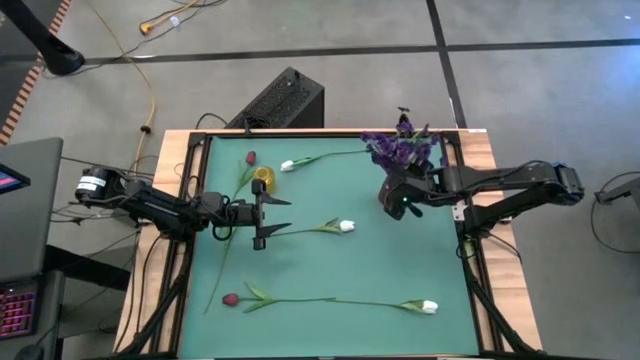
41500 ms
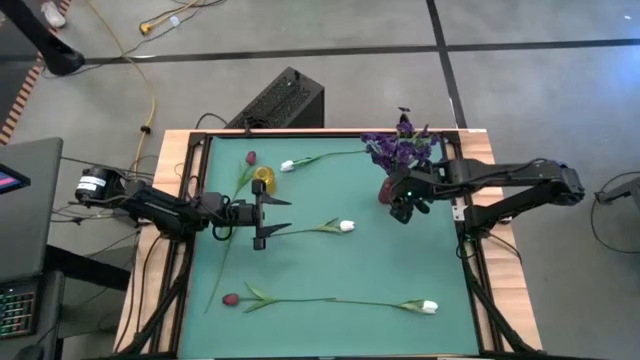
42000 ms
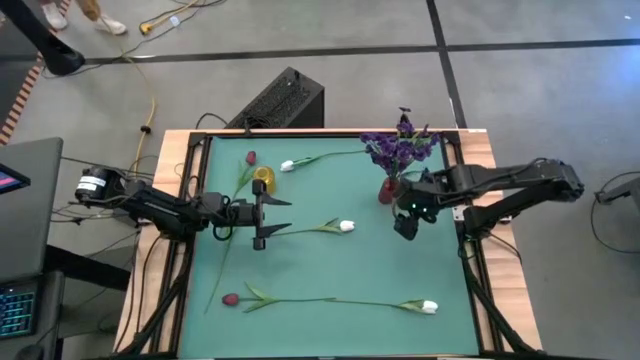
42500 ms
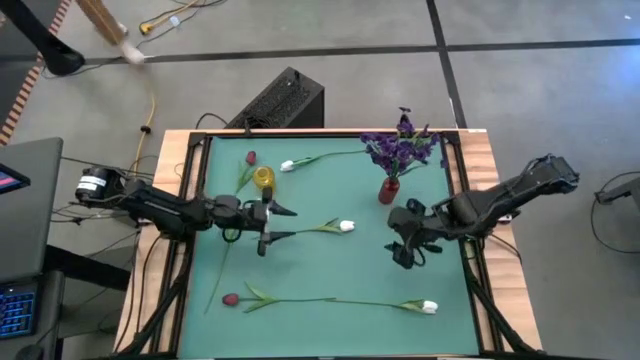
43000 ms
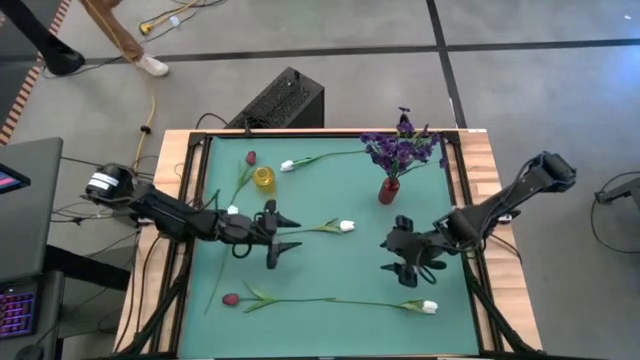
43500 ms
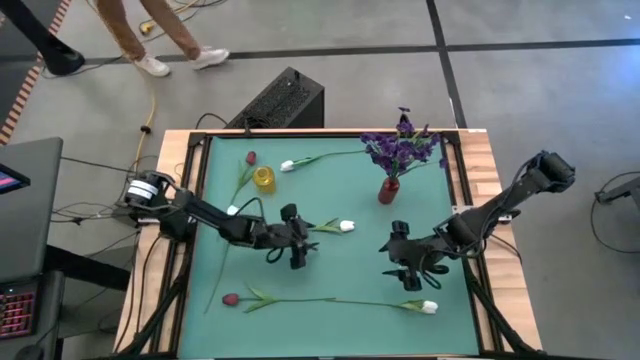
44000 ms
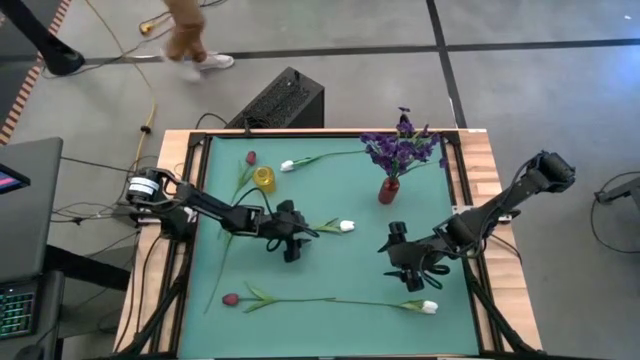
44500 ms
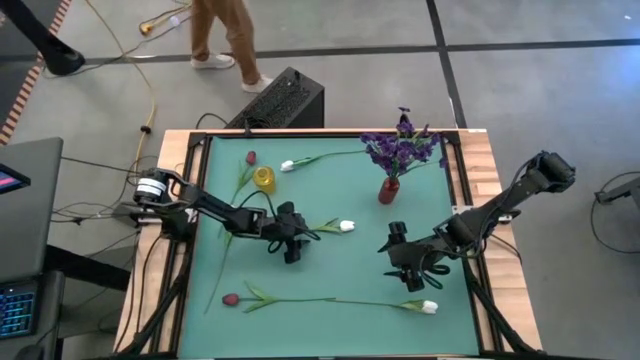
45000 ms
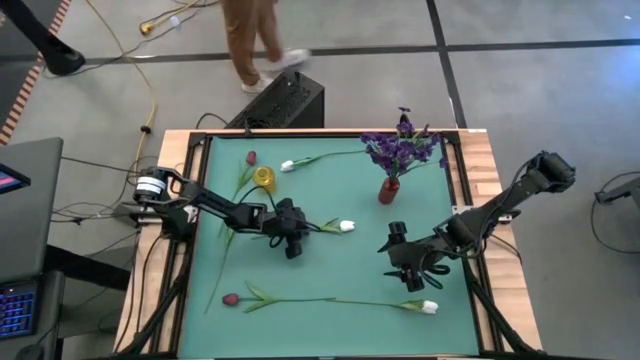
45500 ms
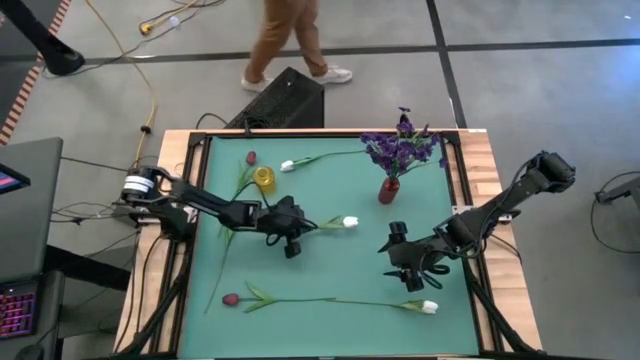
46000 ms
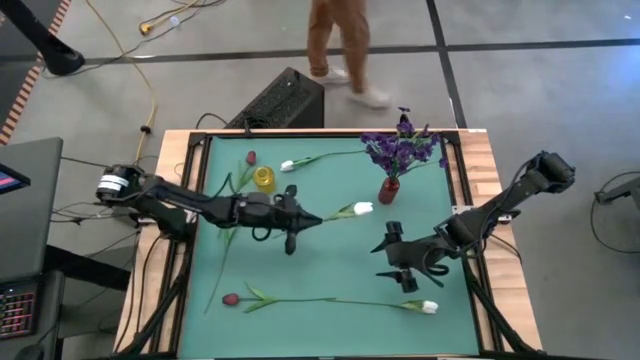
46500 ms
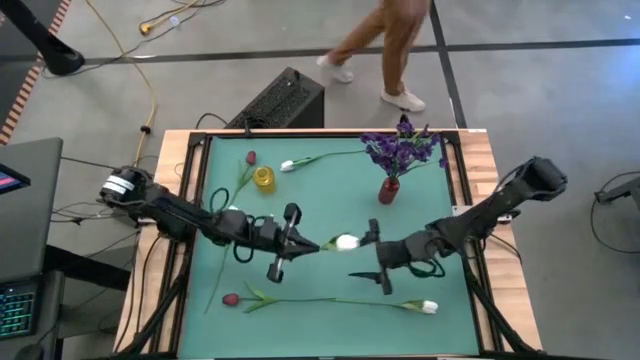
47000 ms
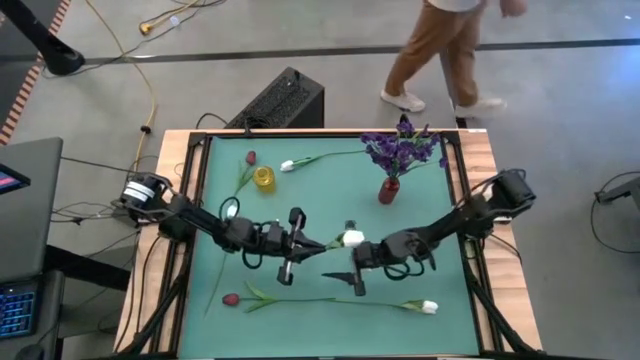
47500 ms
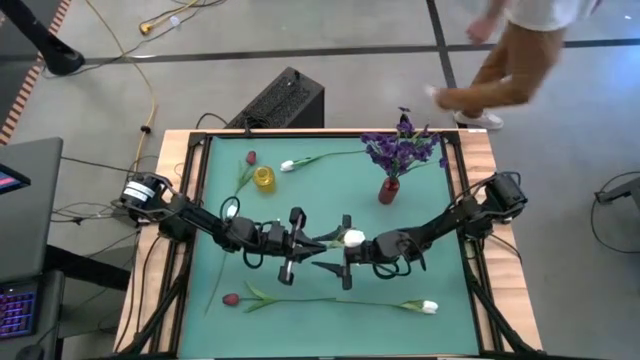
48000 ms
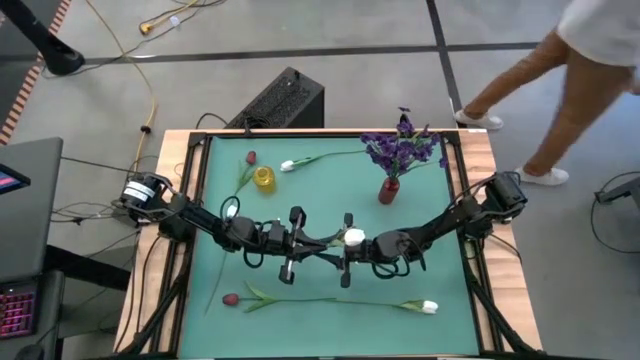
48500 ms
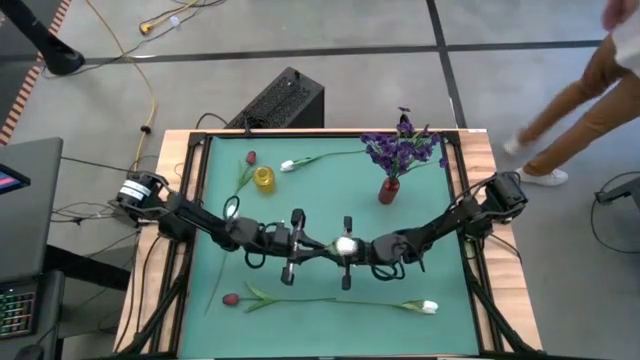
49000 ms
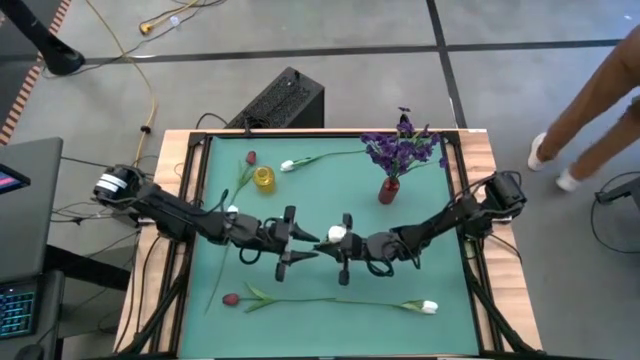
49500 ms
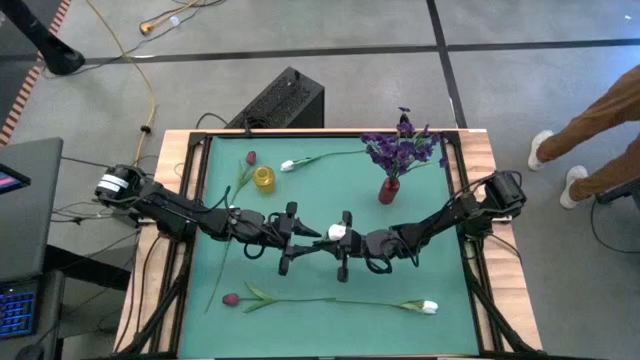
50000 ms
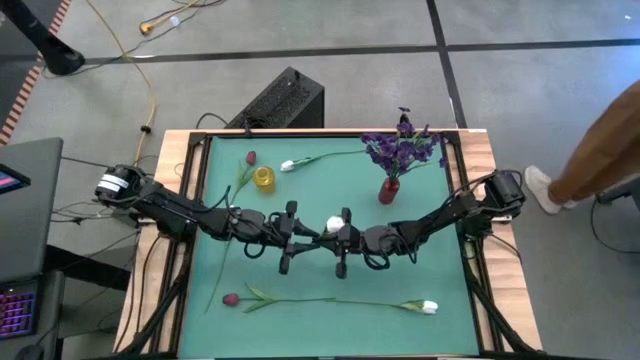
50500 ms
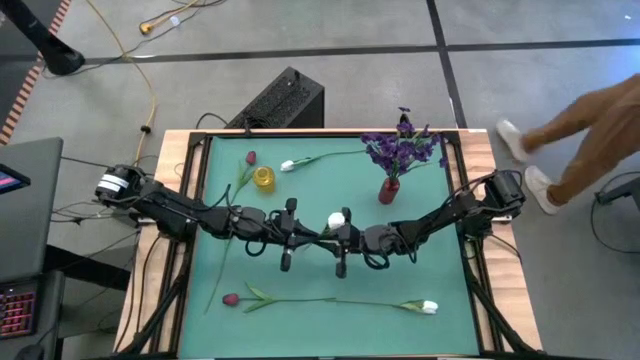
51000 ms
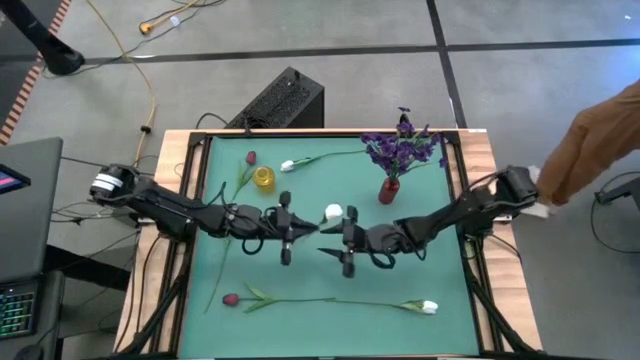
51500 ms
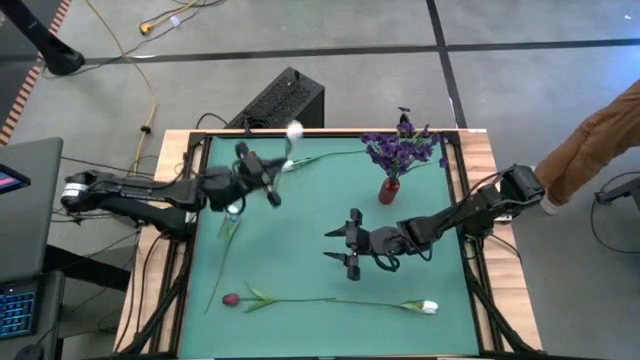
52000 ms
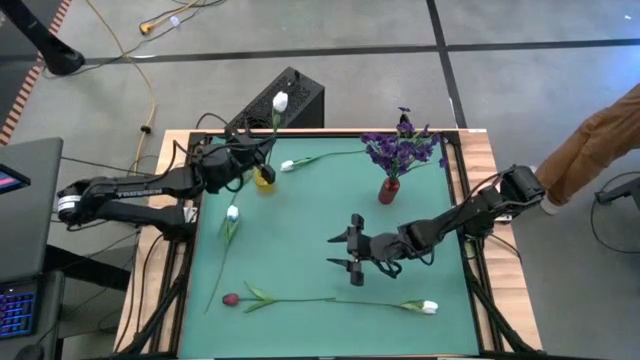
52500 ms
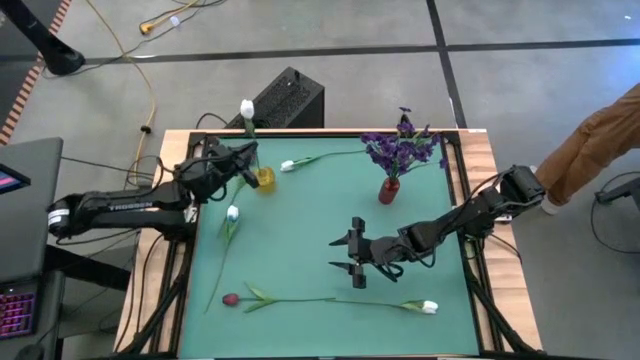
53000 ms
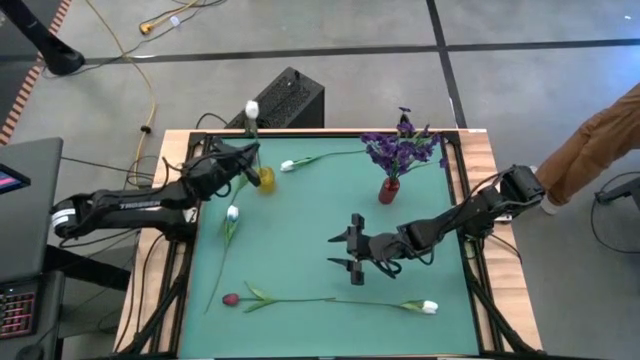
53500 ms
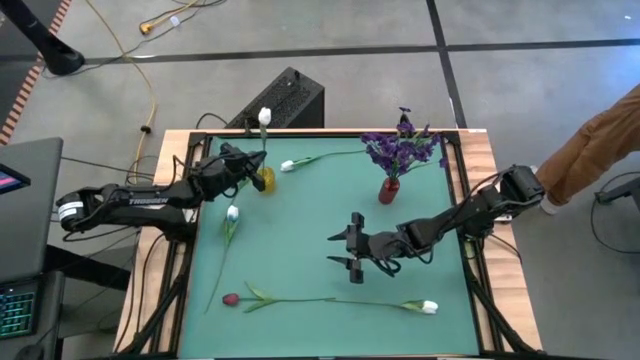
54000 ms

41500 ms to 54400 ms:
Task: Sort flowers into vase by color
Put the center white flower into the yellow vase

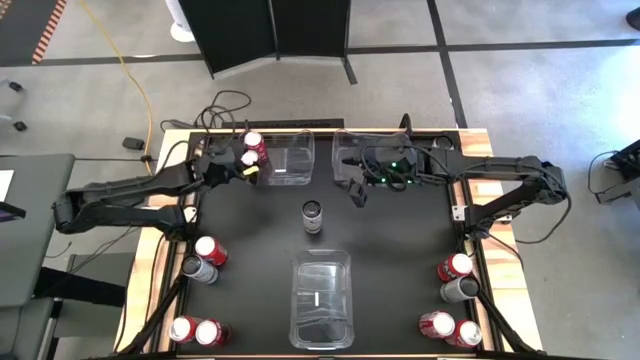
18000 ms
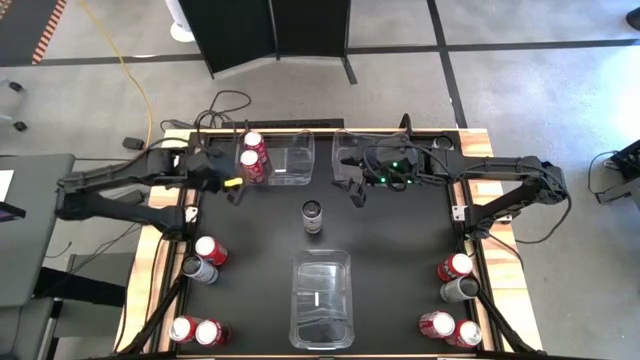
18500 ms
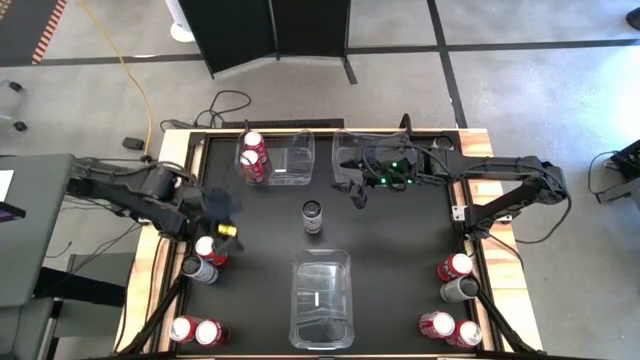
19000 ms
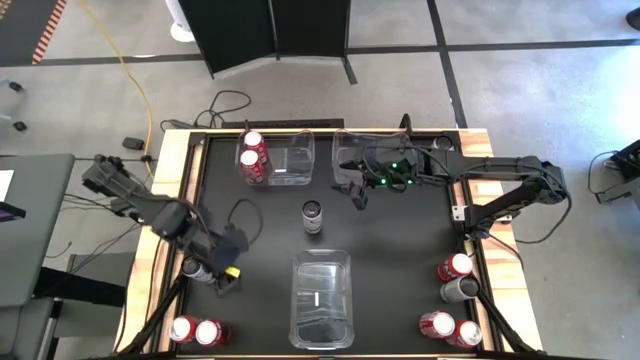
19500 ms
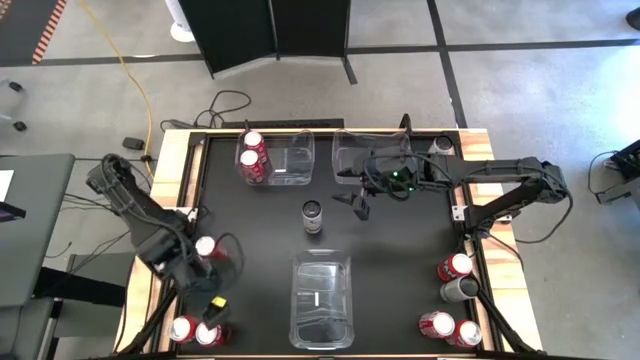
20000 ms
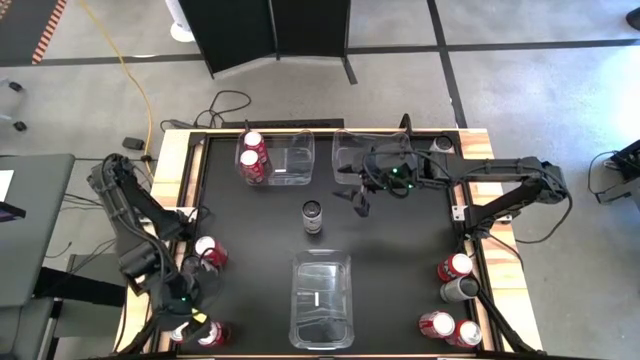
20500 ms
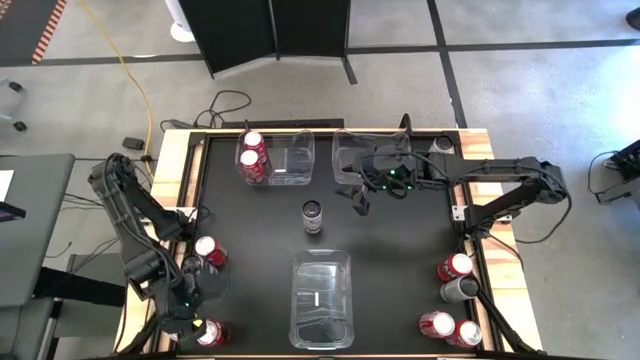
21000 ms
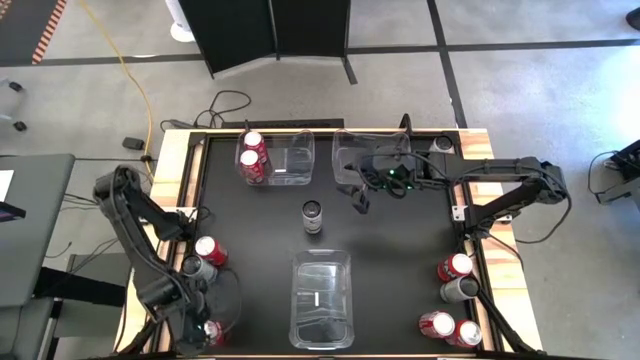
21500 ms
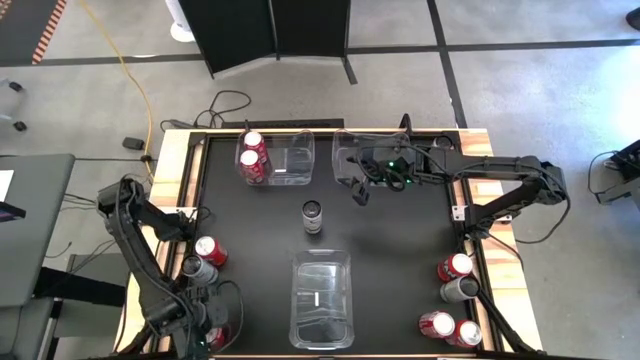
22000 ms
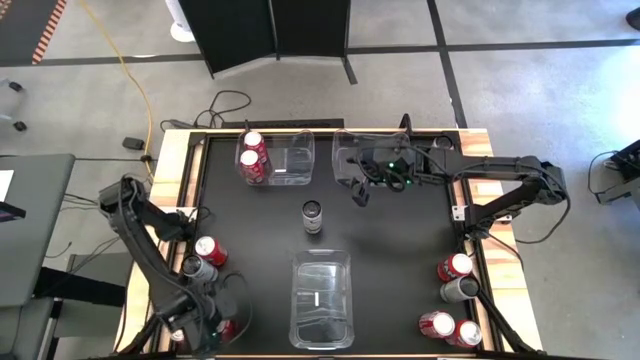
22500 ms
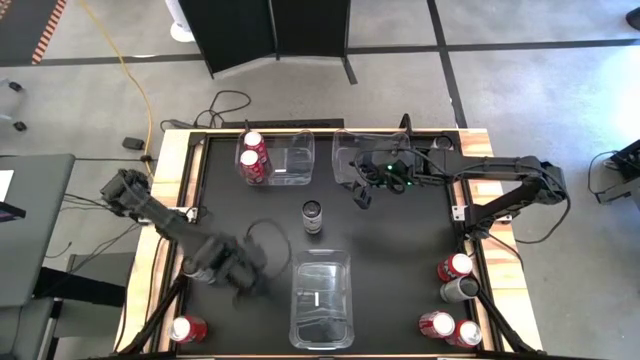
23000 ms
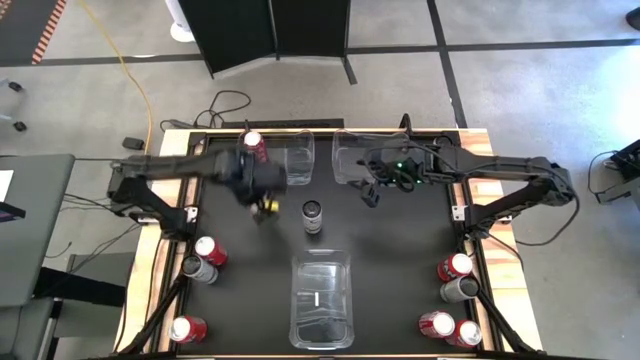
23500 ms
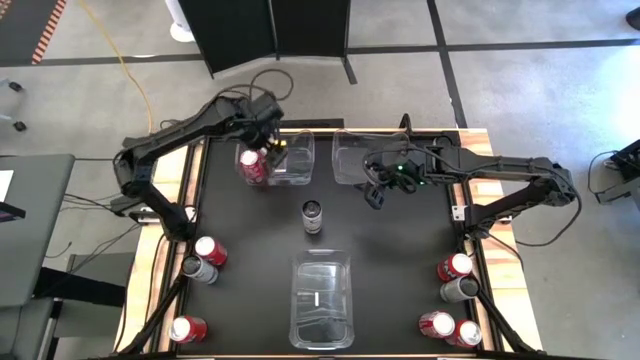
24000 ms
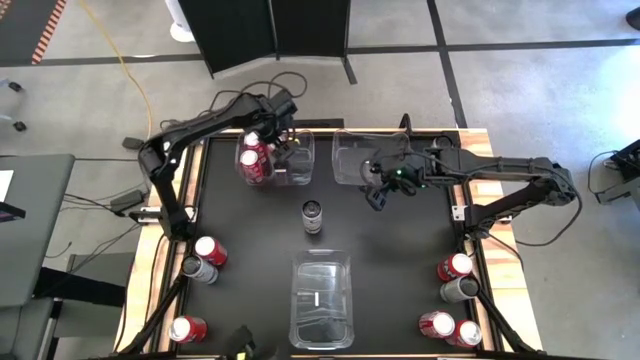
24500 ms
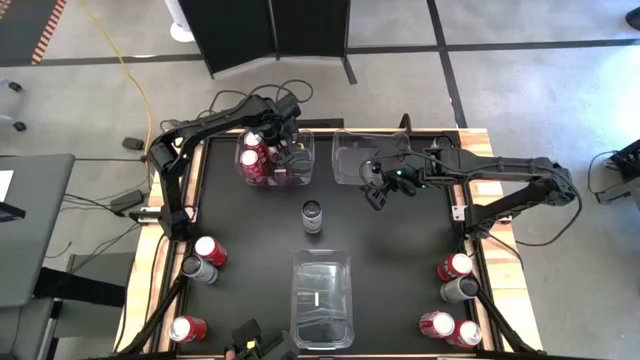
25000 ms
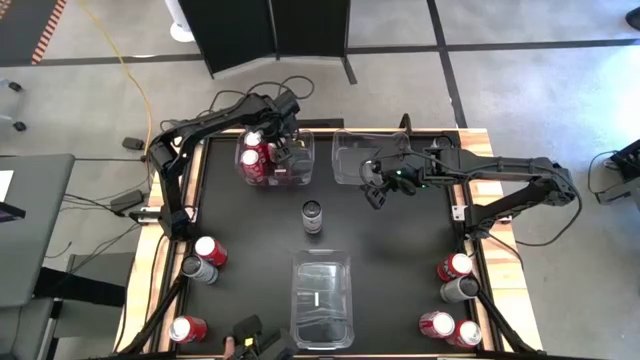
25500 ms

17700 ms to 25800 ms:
Task: Sort soda cans
Put the red white soda can into the left transparent bin
